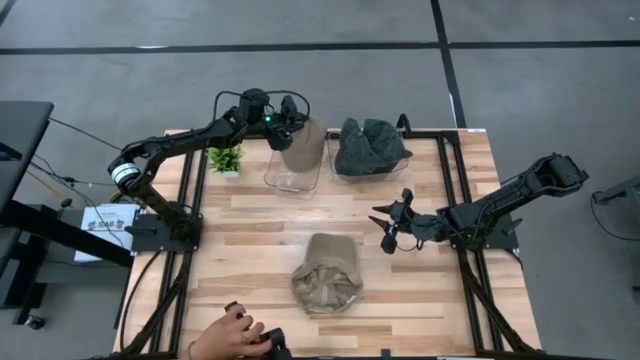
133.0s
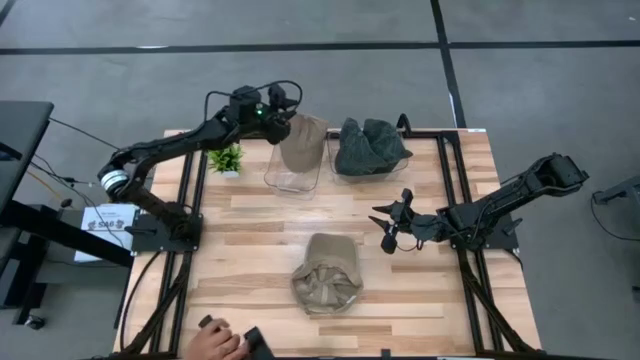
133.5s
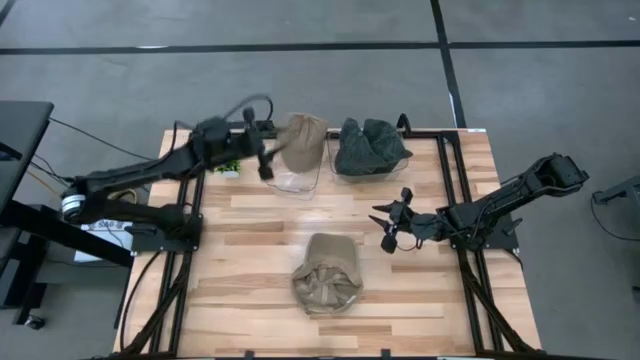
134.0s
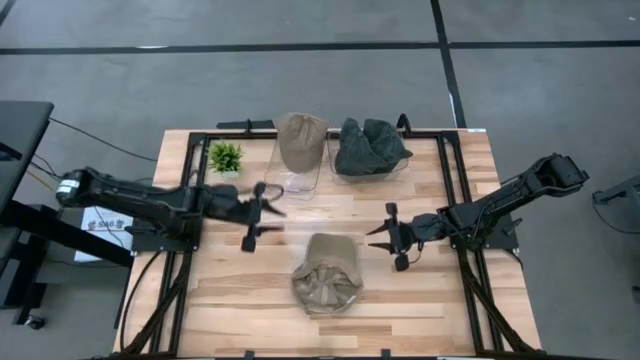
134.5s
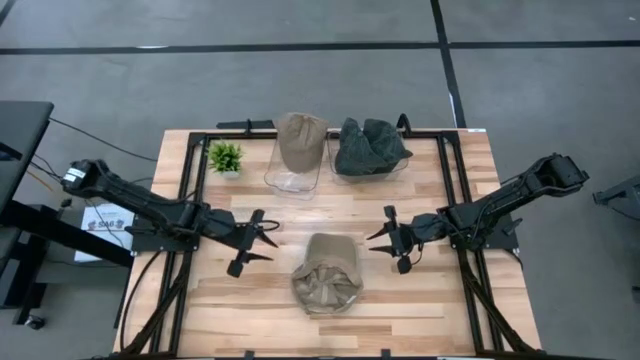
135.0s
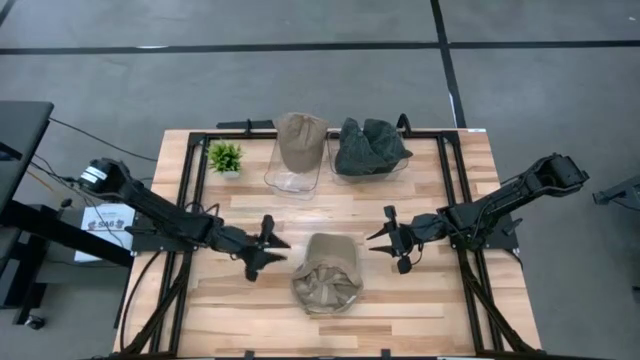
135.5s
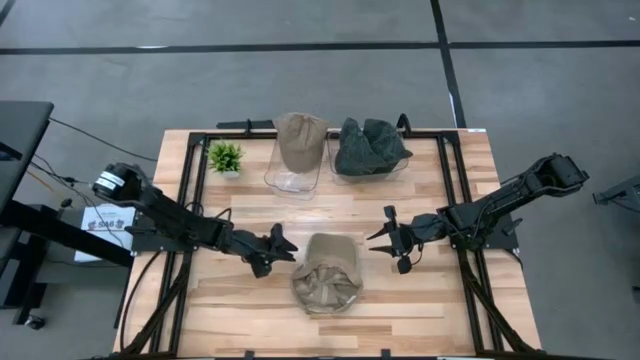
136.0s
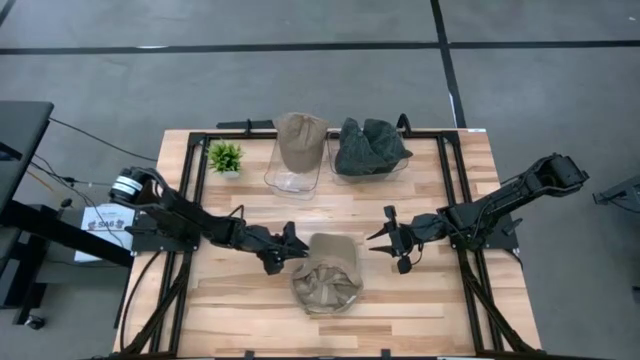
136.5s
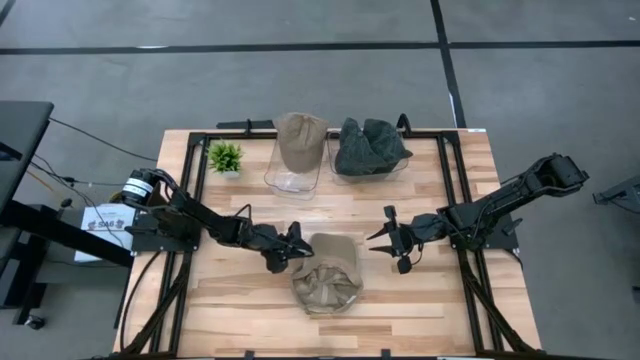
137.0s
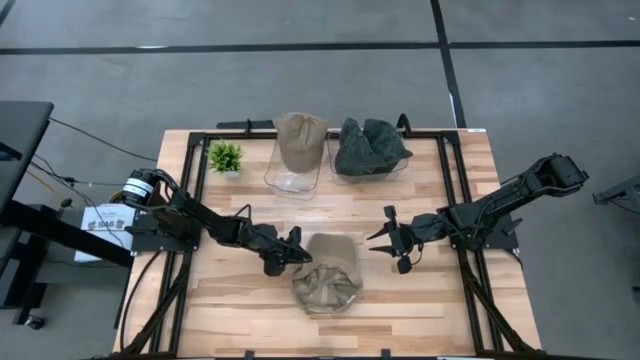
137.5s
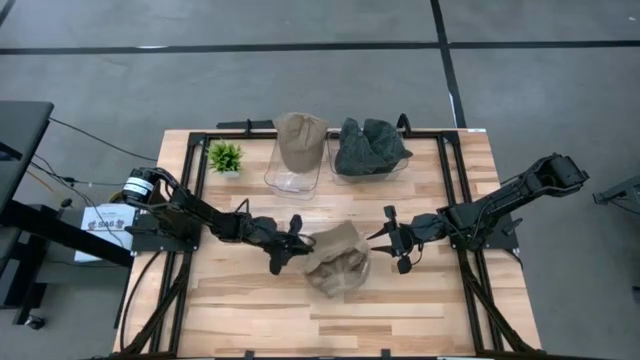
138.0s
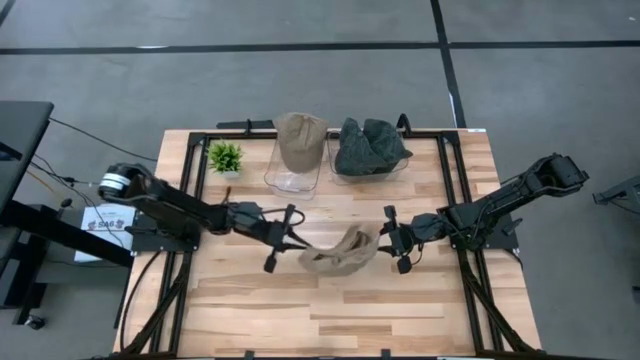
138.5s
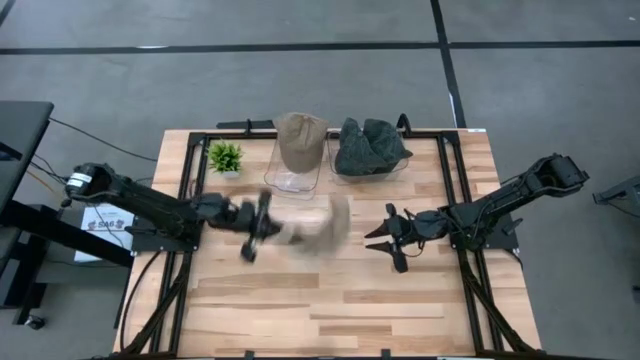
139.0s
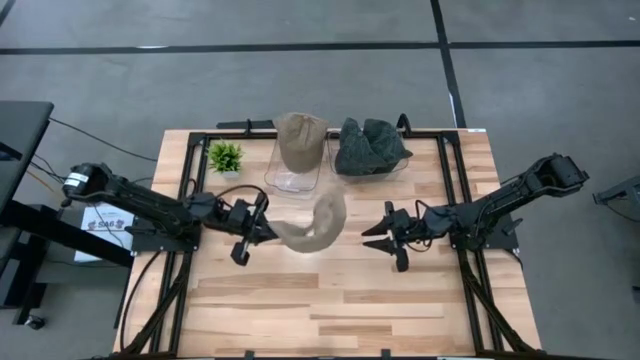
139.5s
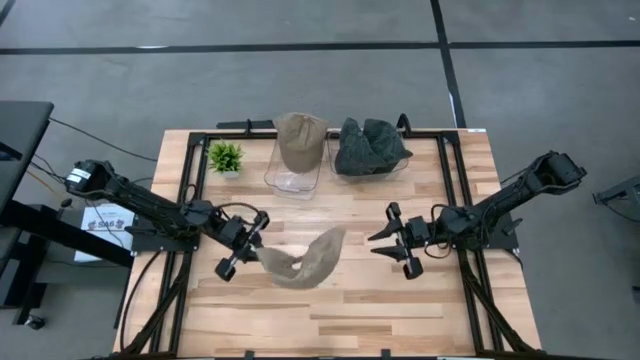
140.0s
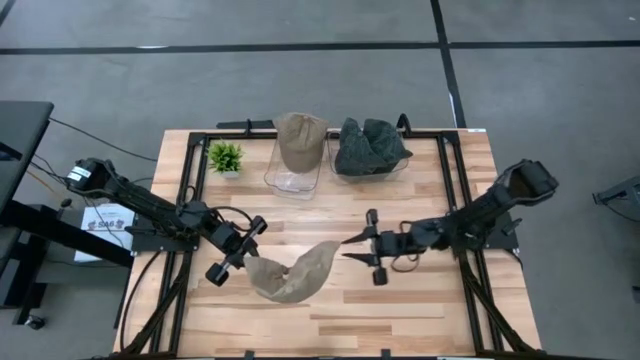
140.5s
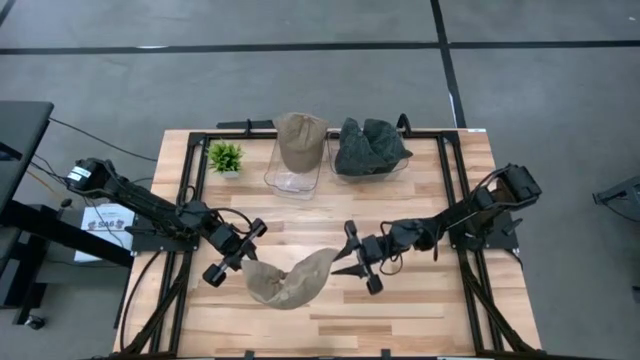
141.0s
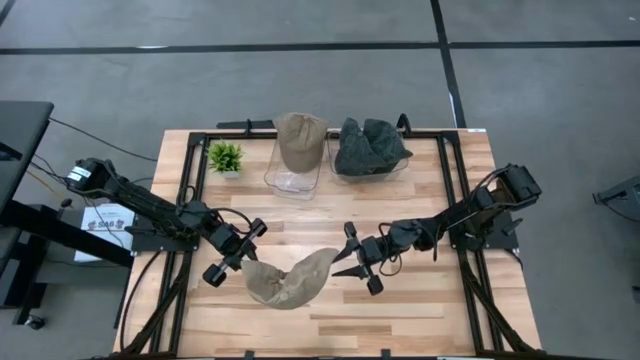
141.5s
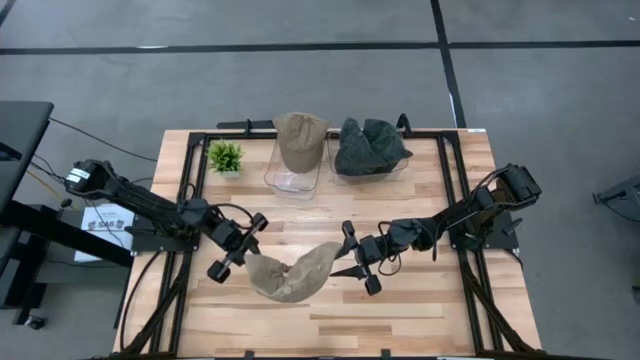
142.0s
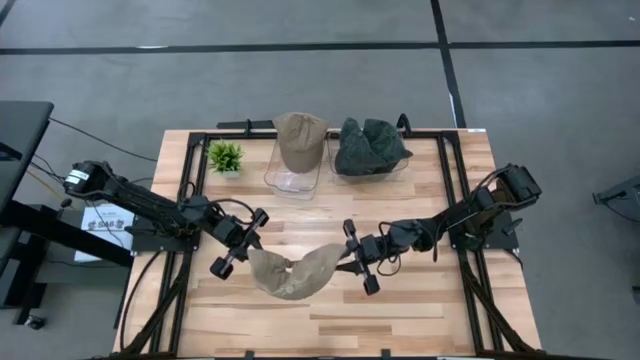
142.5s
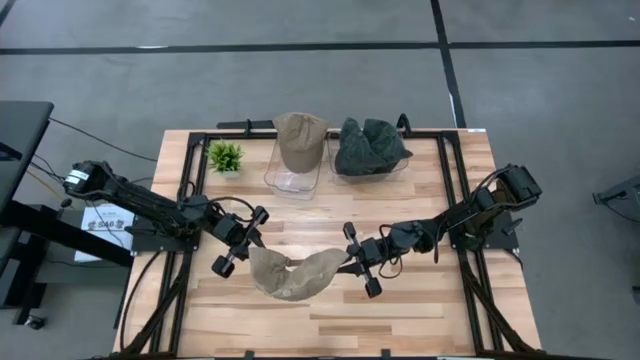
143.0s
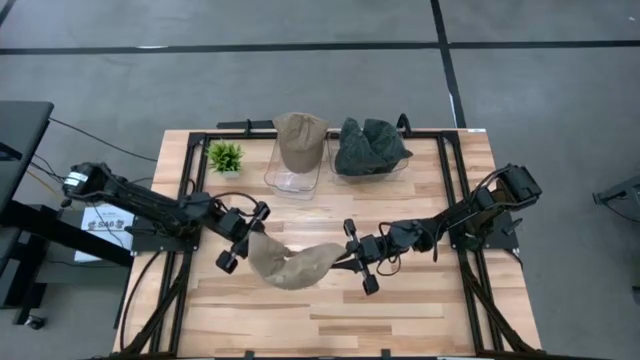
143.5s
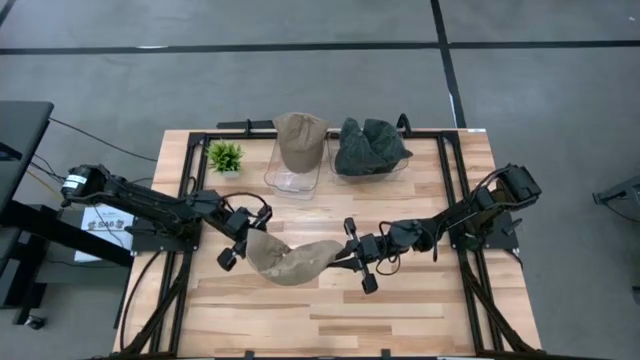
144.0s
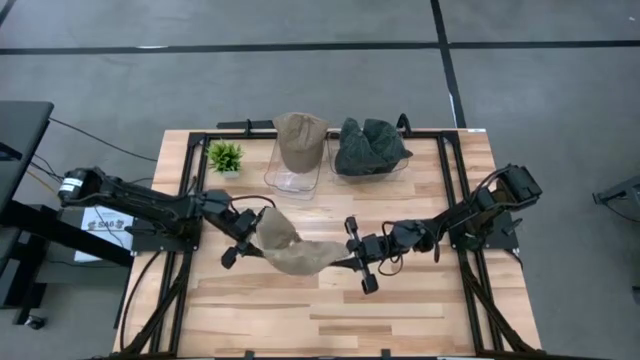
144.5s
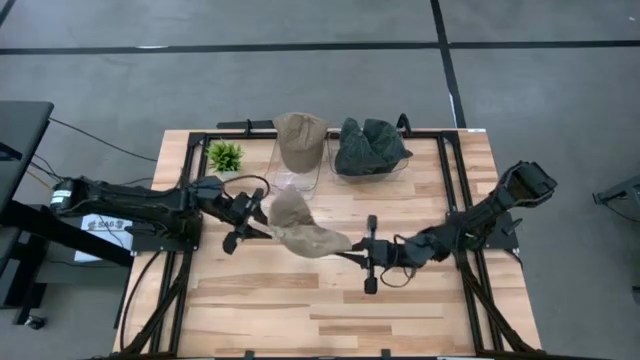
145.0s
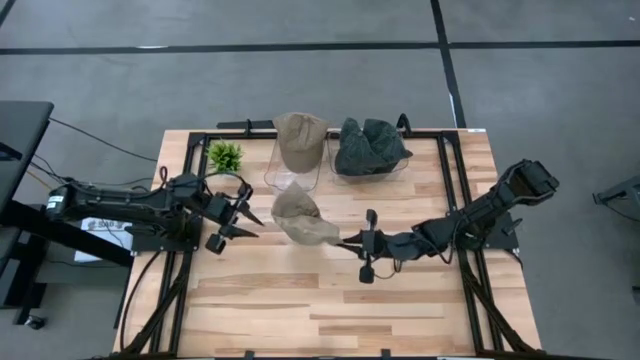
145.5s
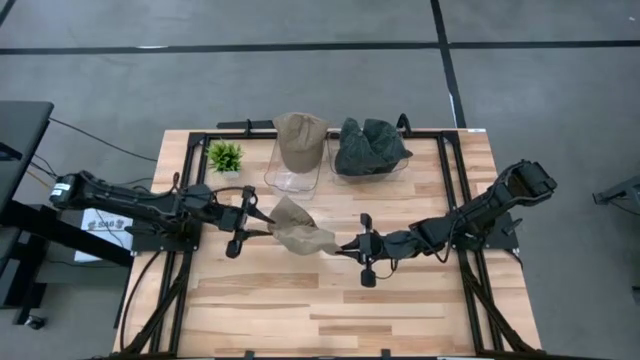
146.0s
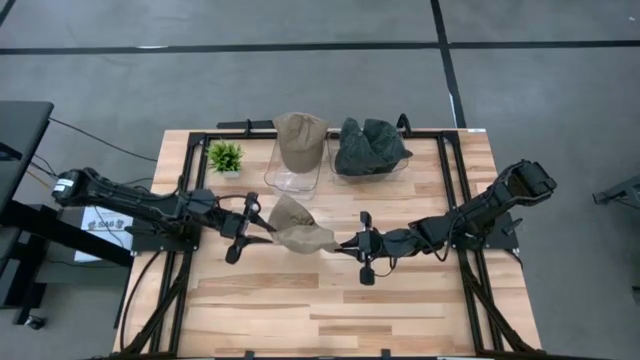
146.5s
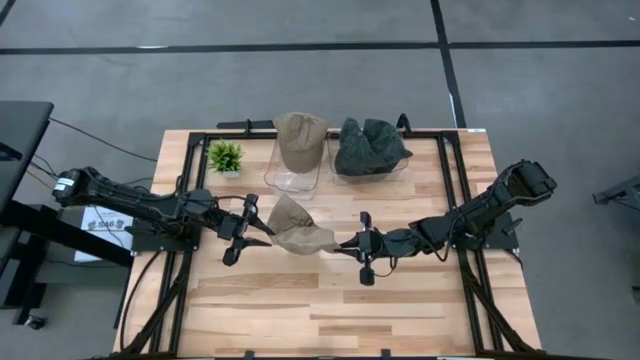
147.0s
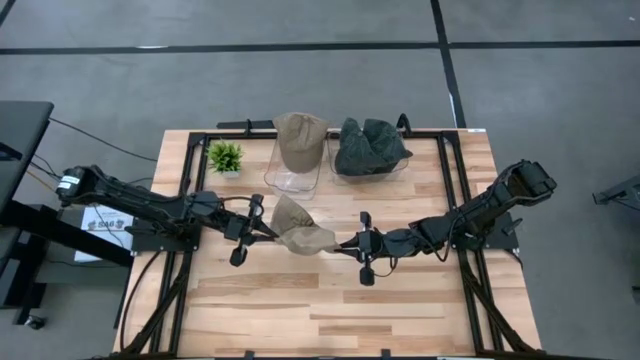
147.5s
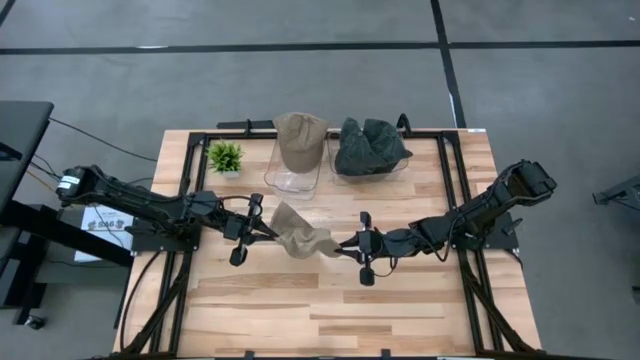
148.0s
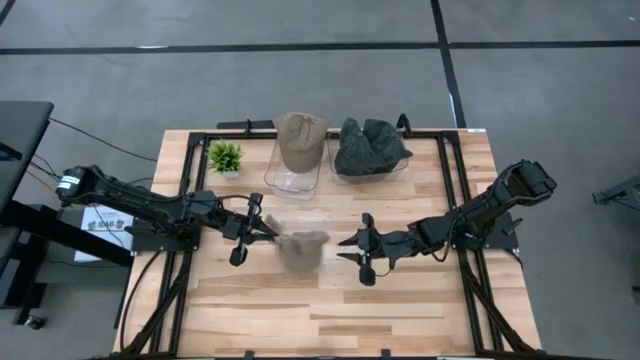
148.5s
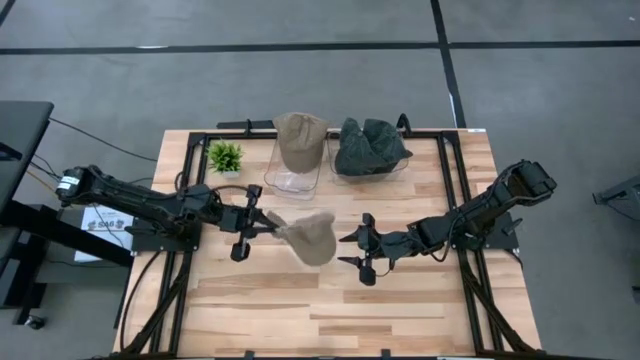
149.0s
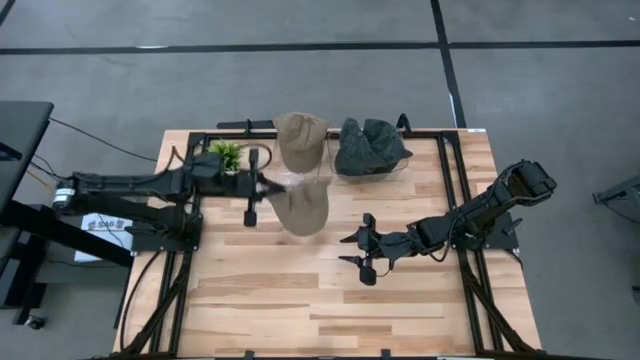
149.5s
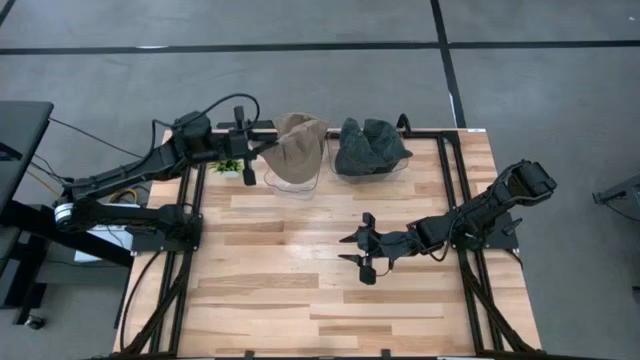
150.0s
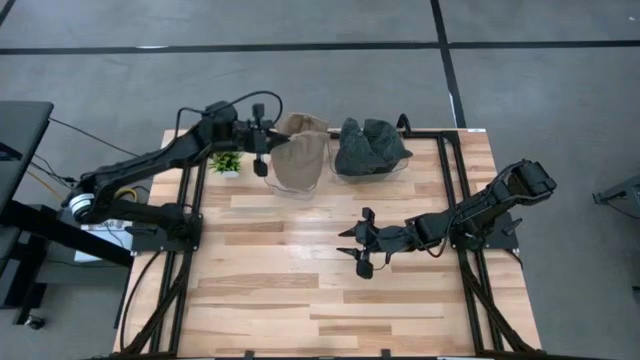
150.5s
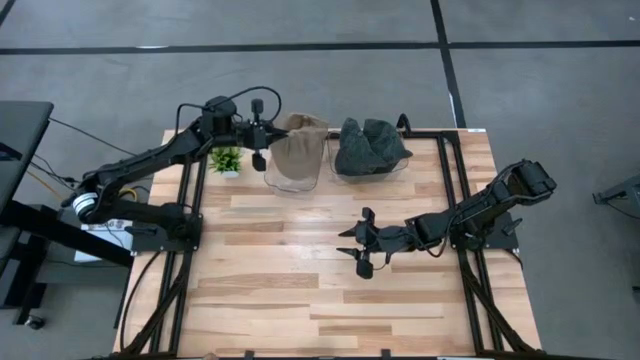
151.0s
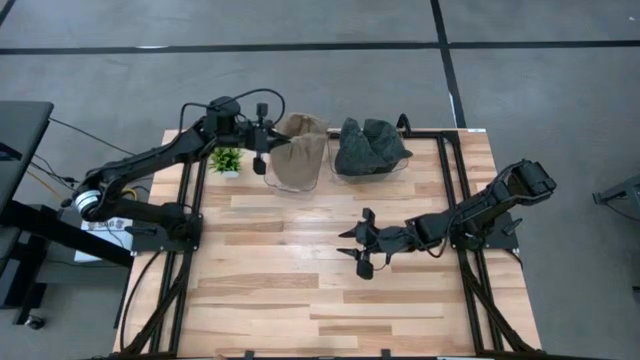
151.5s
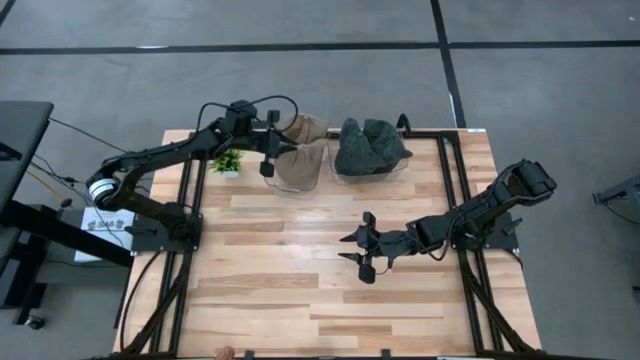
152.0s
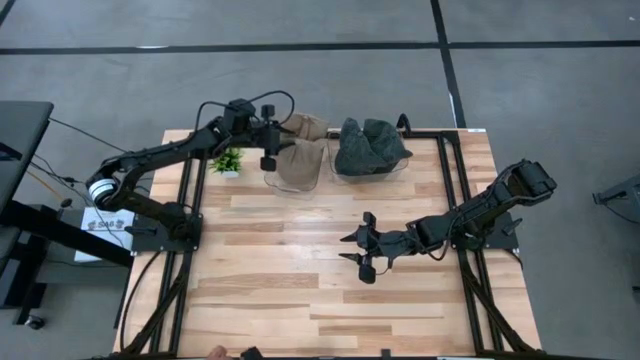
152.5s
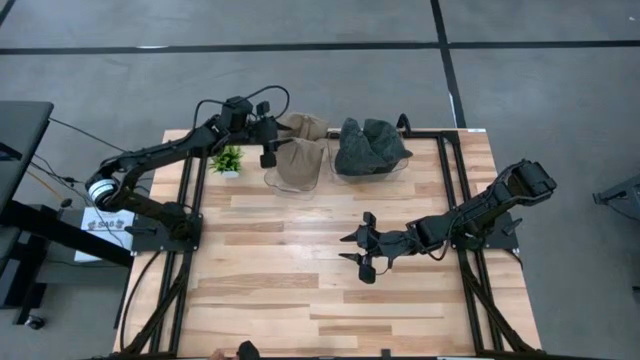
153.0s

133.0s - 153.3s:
Task: Pick & Place hat
Put the light brown cap into the left transparent bin
